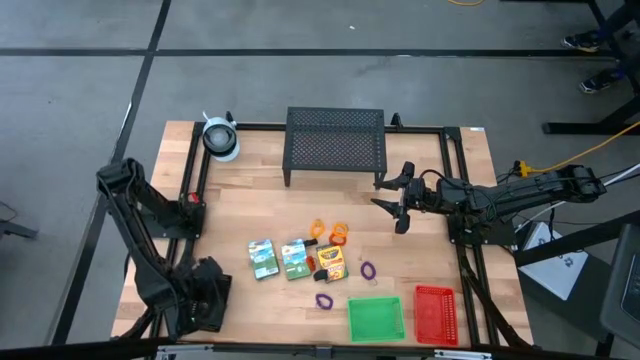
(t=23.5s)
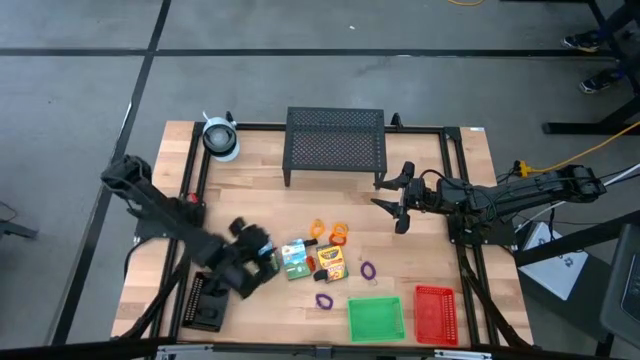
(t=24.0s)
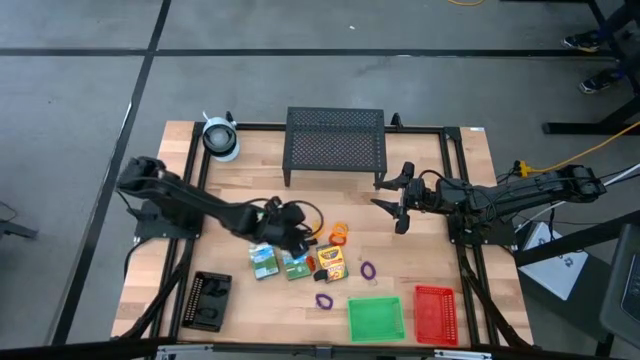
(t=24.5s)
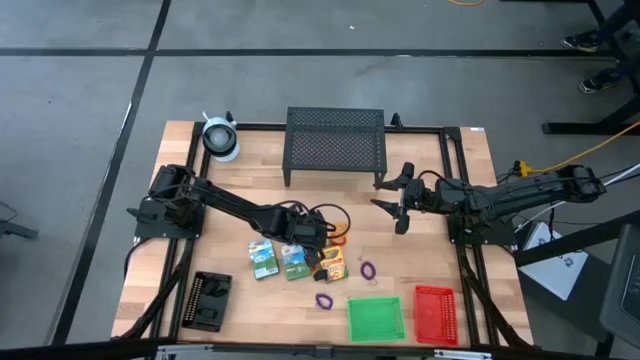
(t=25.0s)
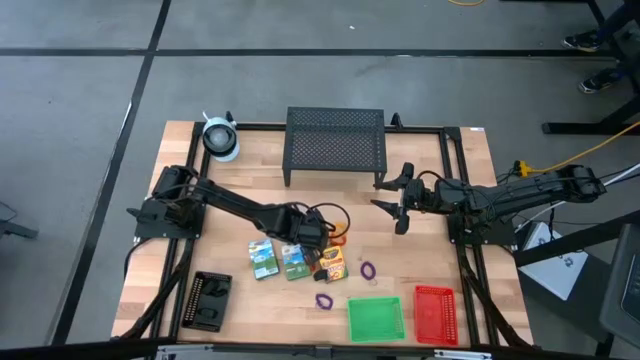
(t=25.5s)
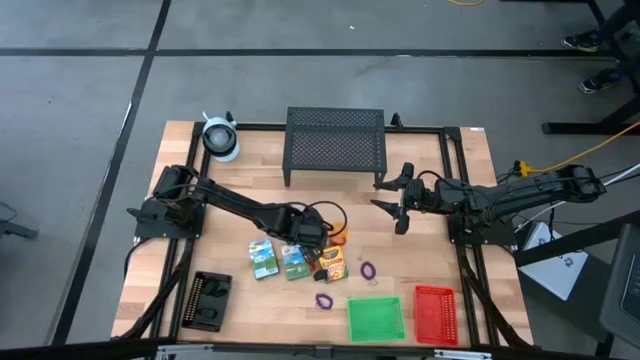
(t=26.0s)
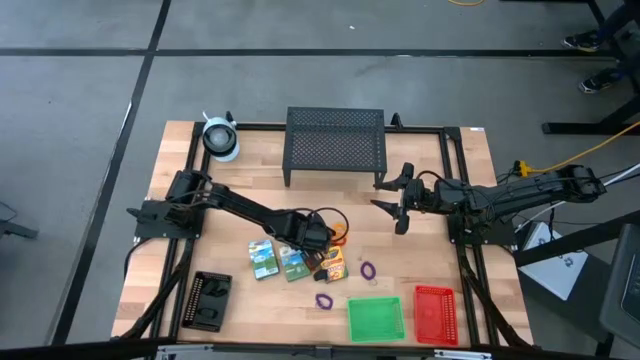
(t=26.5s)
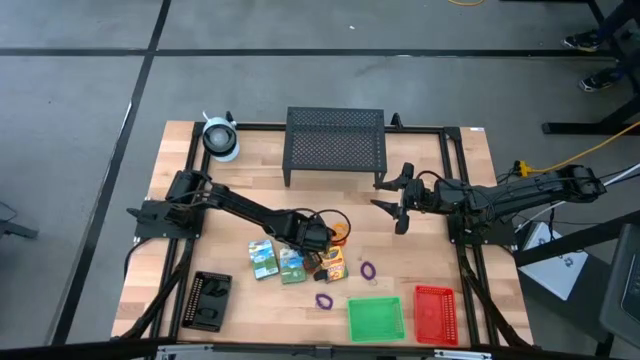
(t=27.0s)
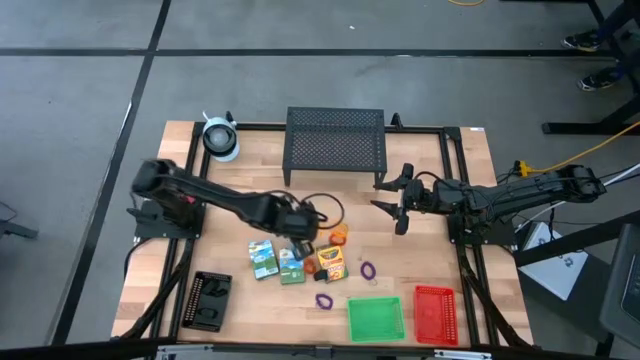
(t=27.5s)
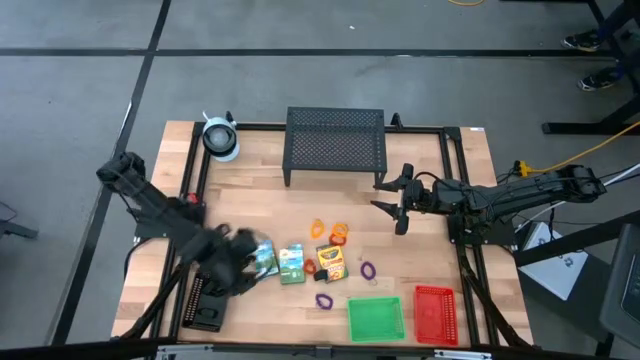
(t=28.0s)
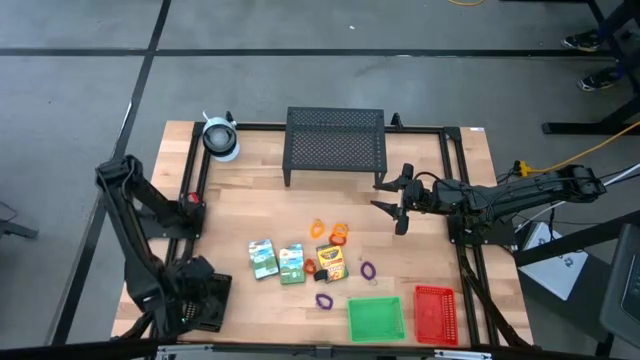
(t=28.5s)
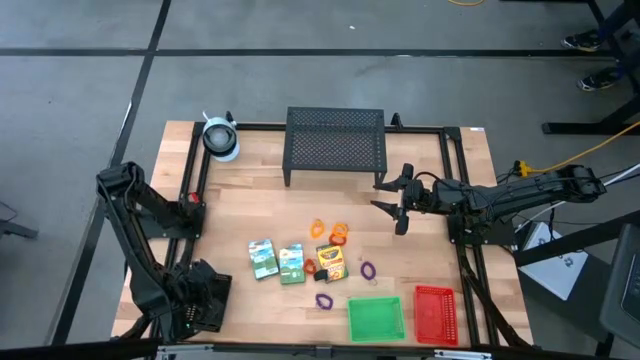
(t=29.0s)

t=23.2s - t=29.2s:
Task: Pick & Place Office Desk Supplies
Put the black rubber band into the black bin

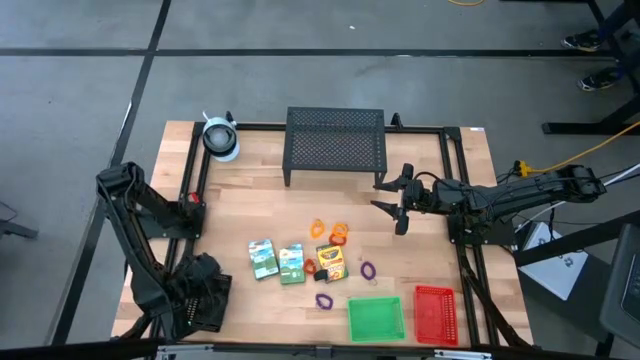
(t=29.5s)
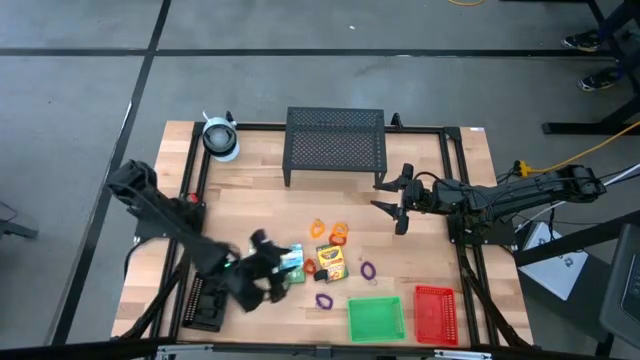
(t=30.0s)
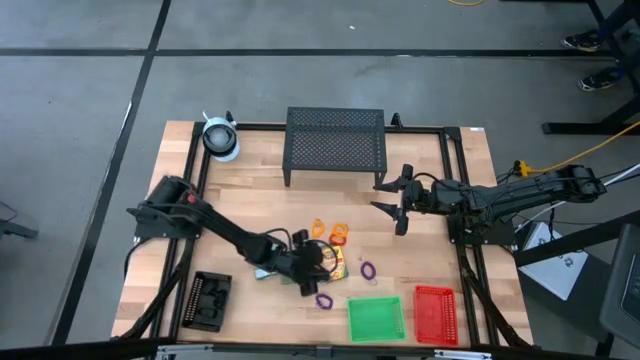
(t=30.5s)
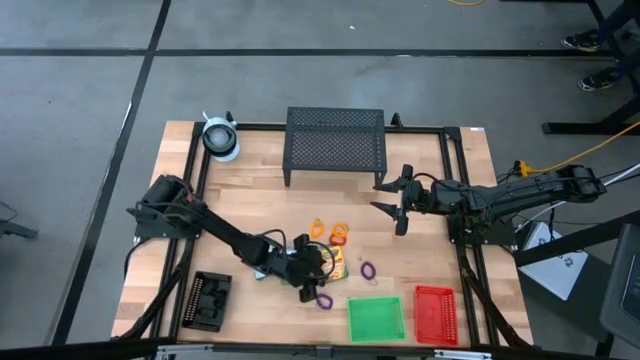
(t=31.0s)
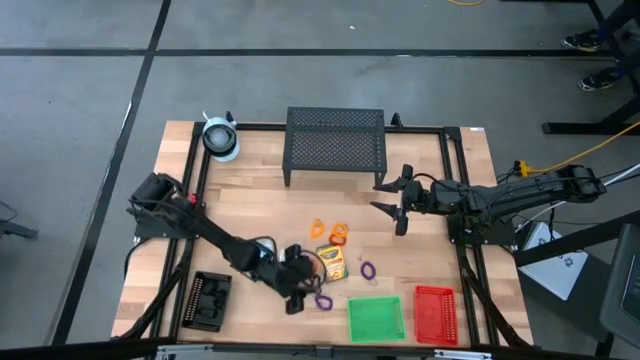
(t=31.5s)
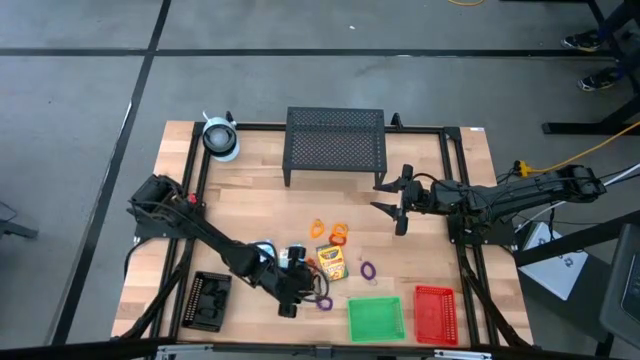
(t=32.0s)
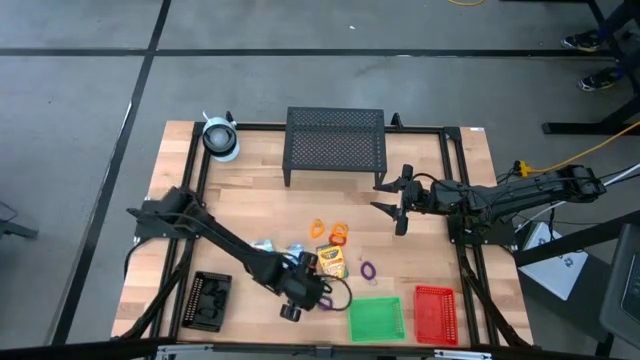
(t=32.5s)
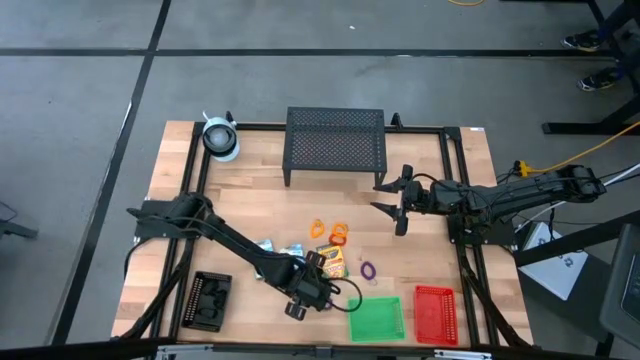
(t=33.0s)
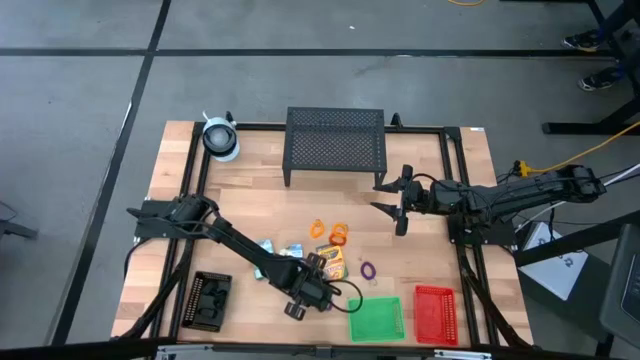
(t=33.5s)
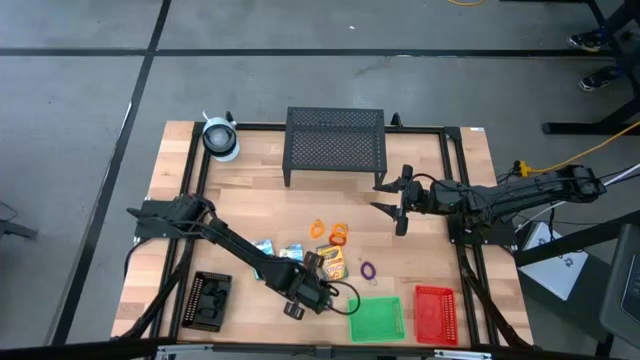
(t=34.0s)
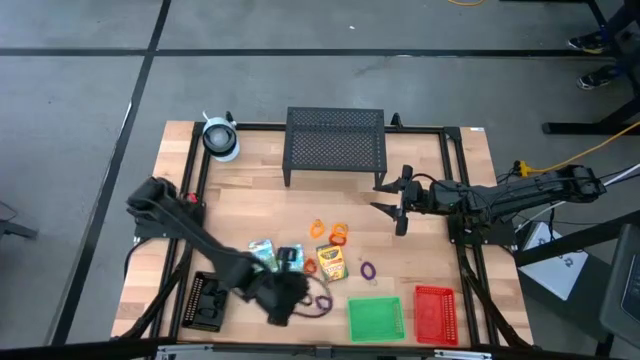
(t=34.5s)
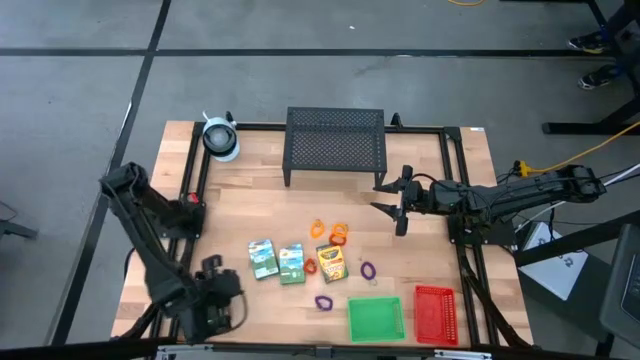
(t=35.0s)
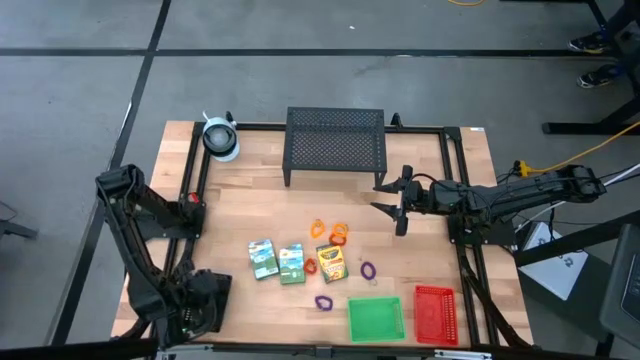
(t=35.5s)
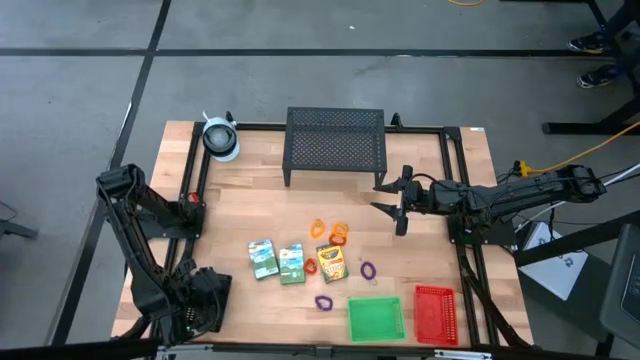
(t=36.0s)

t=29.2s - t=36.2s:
Put the black rubber band into the black bin

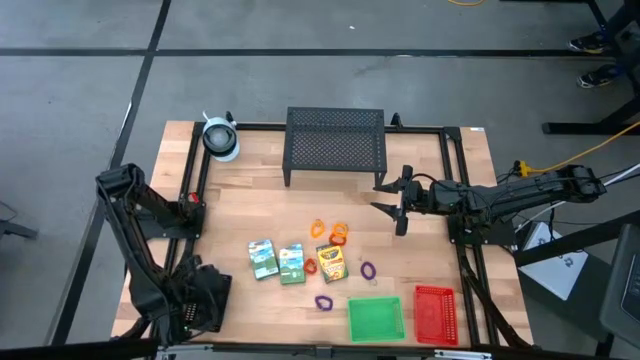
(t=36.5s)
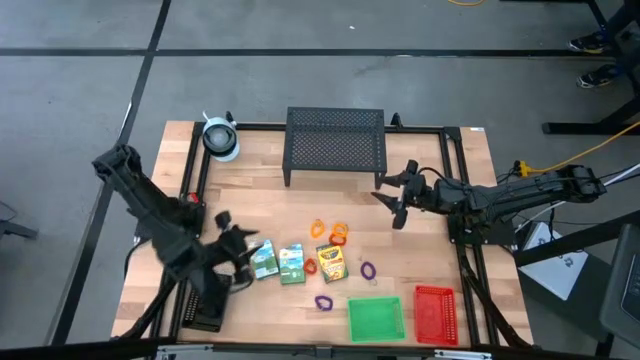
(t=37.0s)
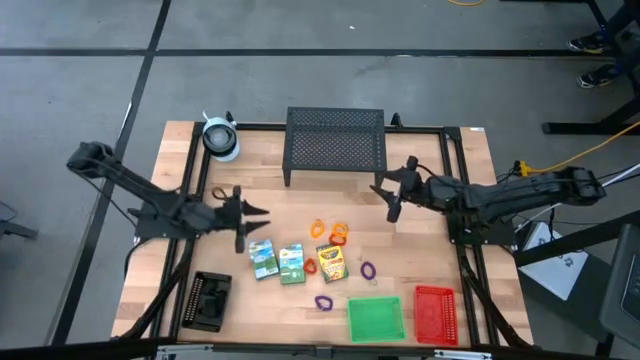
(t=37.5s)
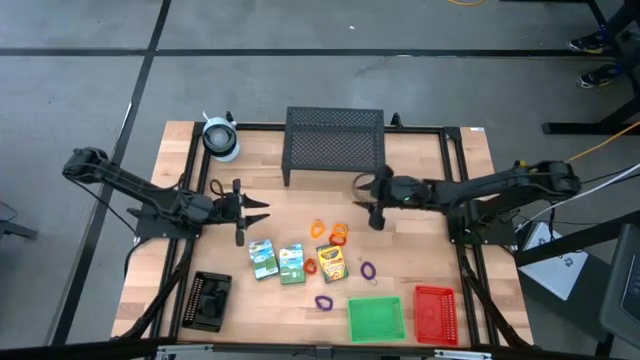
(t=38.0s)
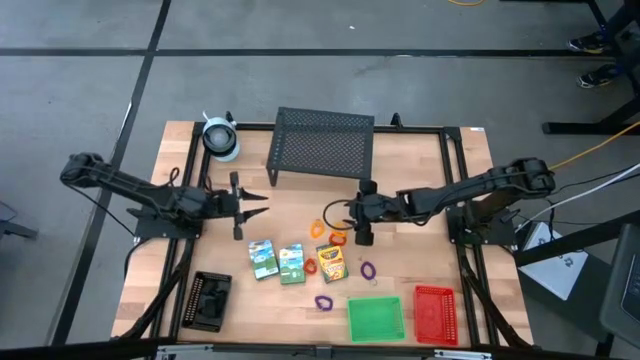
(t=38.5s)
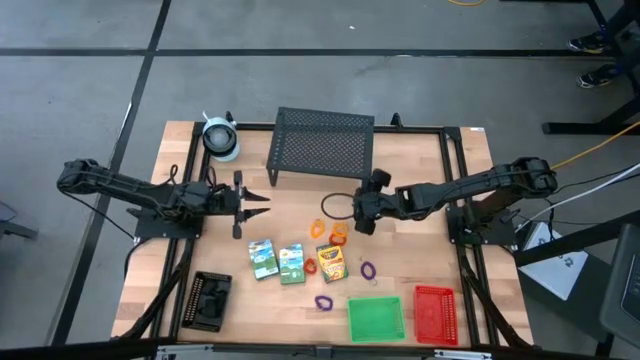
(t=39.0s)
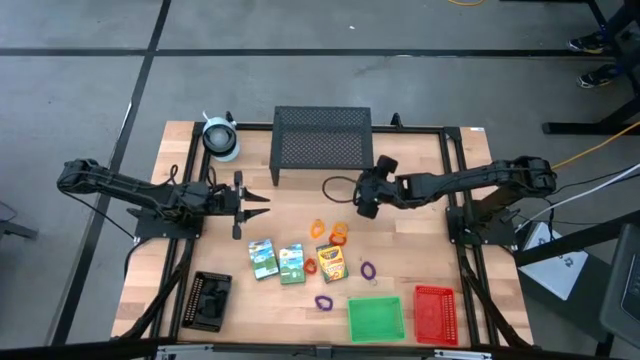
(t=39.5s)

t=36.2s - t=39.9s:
Adjust the black shelf

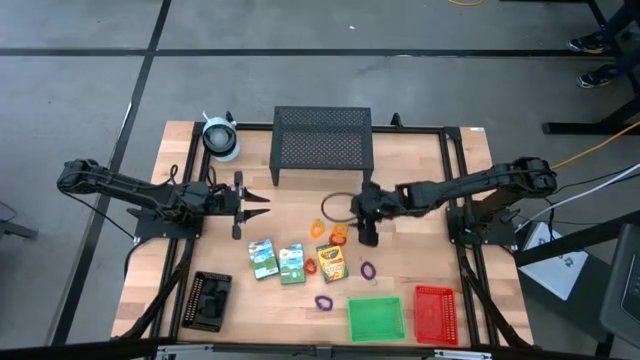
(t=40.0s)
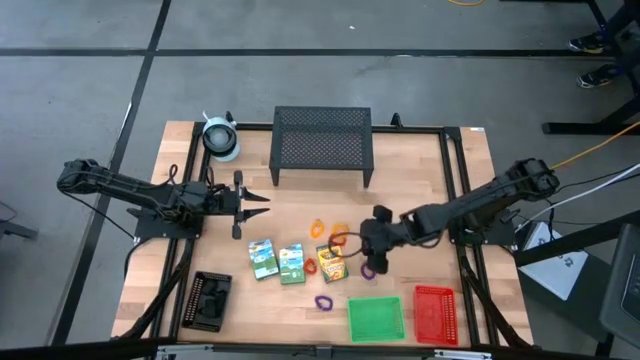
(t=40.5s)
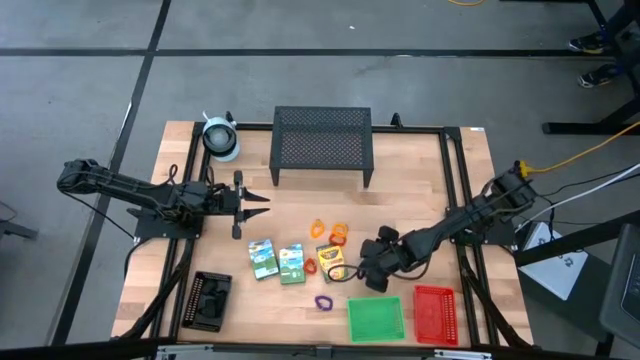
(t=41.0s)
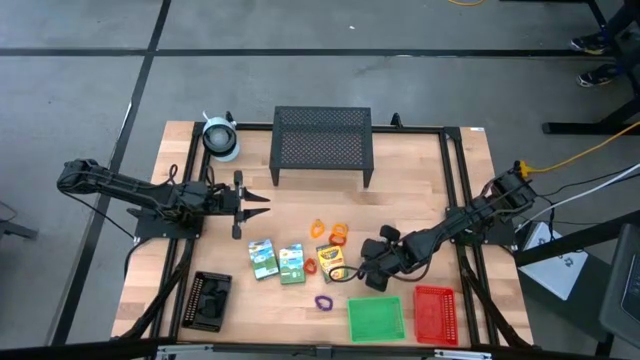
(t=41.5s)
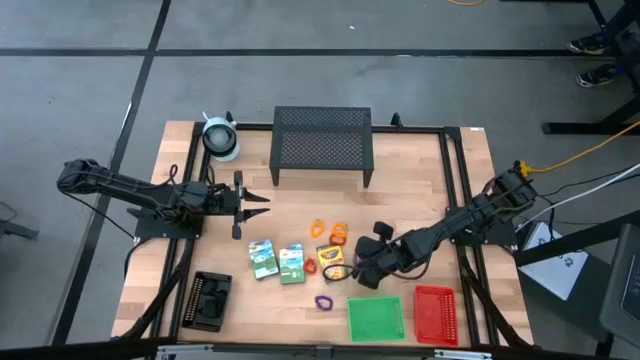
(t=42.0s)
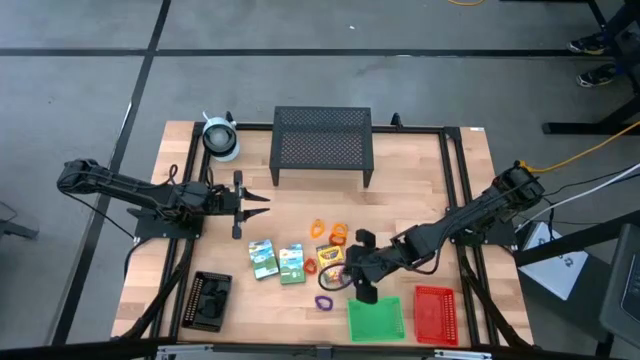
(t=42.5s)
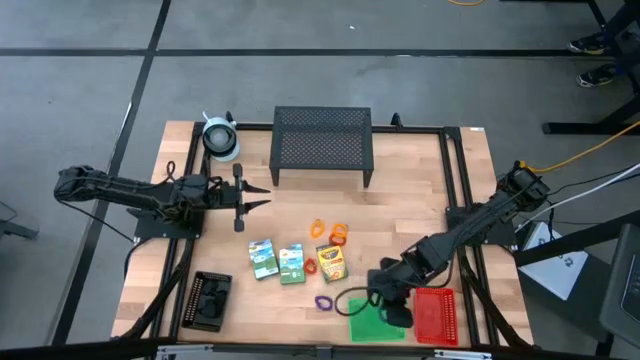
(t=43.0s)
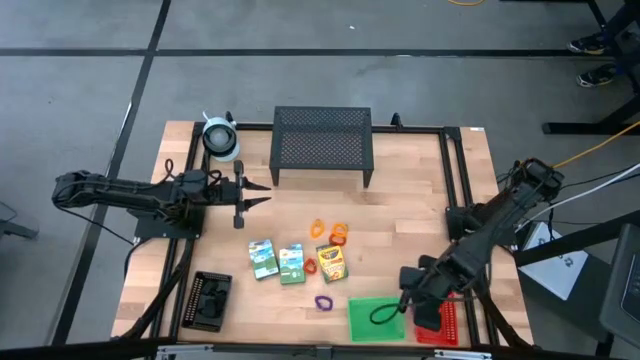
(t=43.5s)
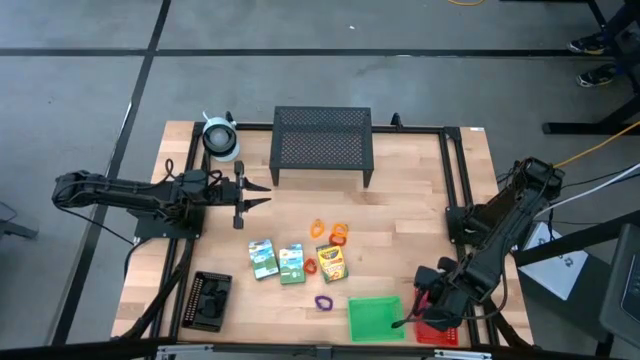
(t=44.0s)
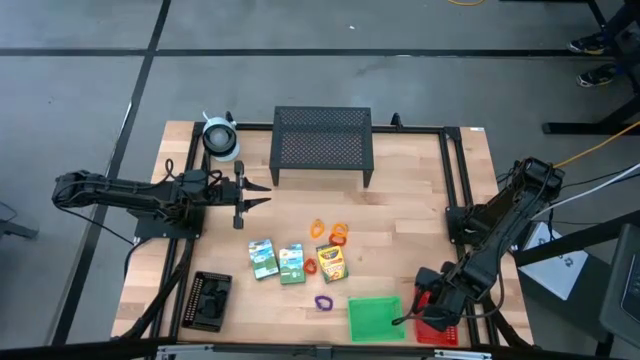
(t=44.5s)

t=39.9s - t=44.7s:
Put the purple spring keychain into the red bin
